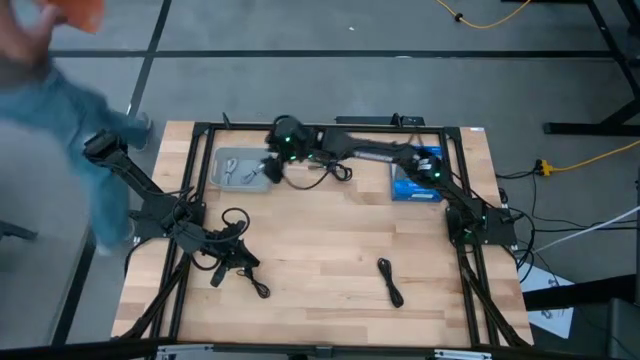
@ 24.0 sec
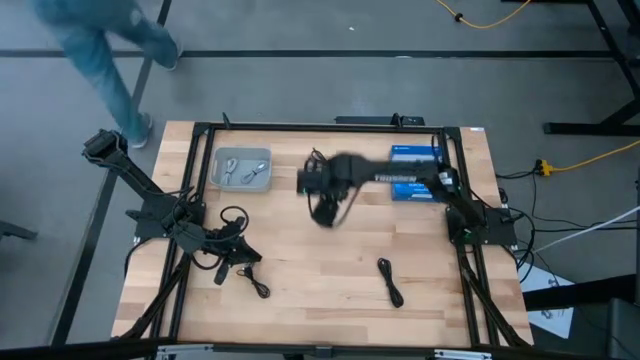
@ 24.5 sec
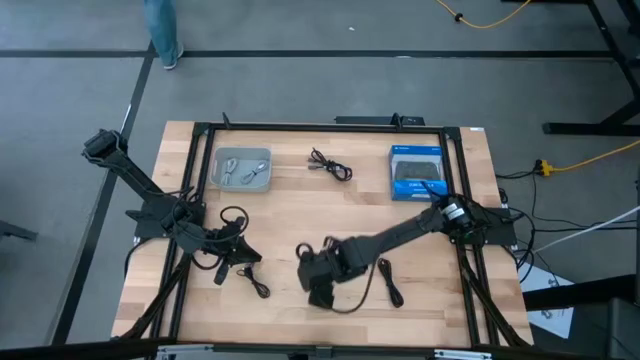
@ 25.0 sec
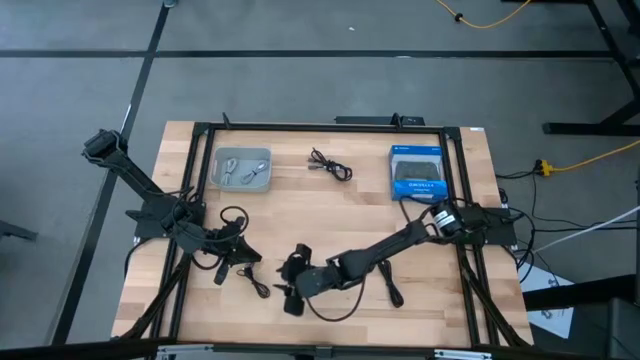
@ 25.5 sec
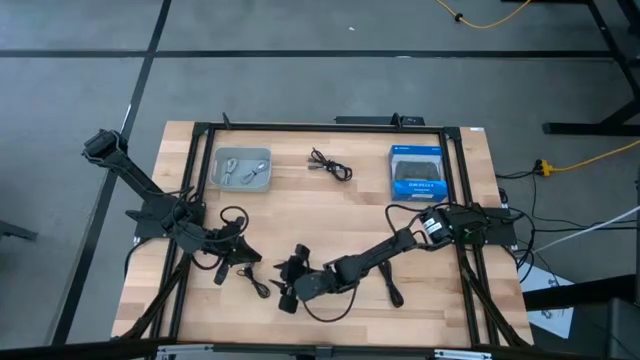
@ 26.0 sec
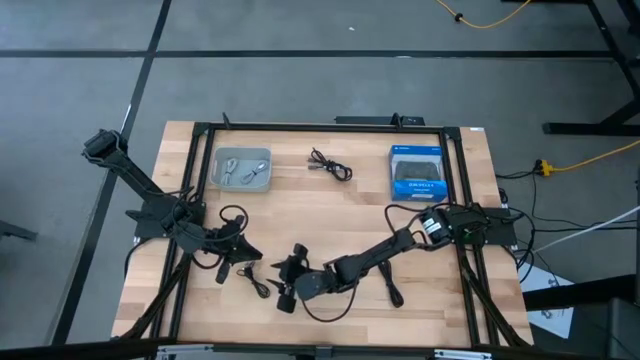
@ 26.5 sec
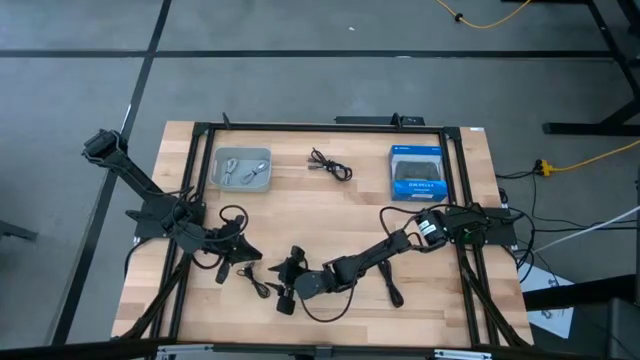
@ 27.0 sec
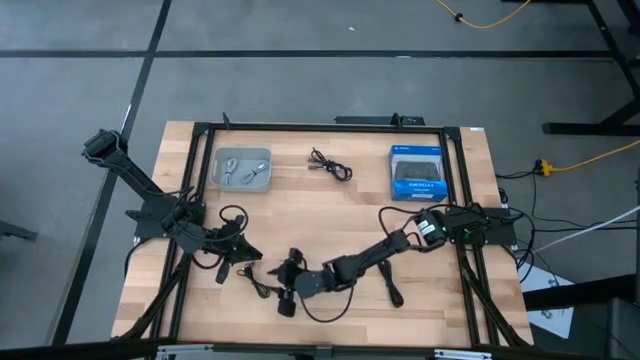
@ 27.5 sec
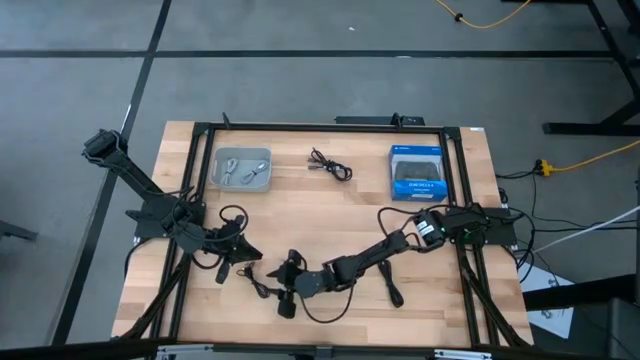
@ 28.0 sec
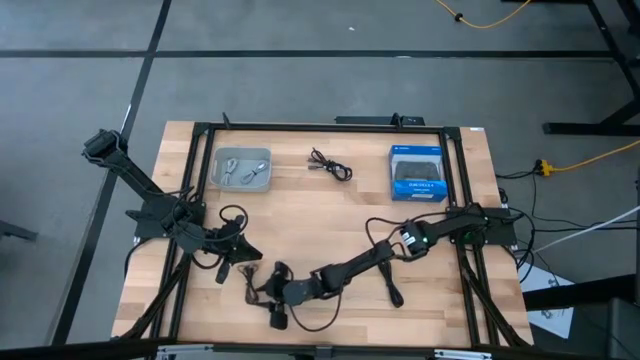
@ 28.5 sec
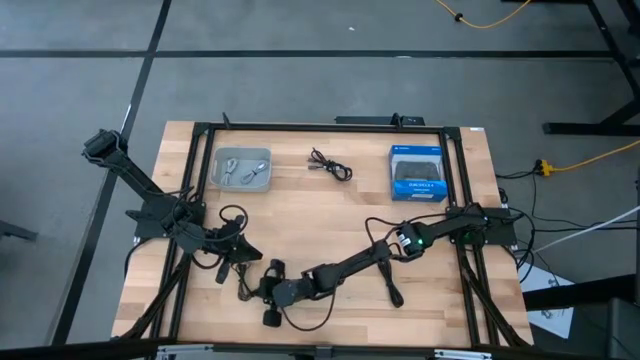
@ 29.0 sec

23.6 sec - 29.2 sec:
Task: Pick and place USB-C Cables
Put the bottom left black charger cable into the gray bin

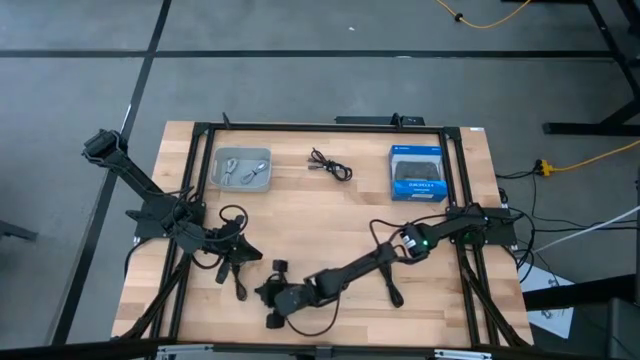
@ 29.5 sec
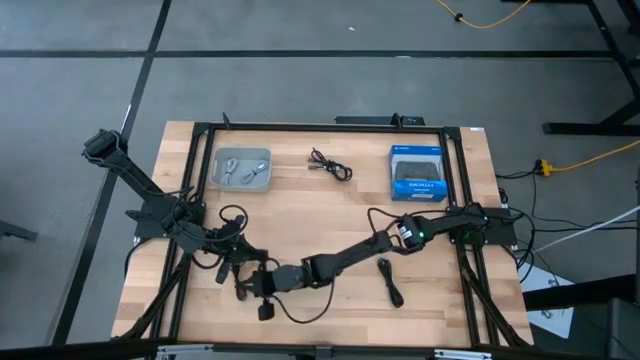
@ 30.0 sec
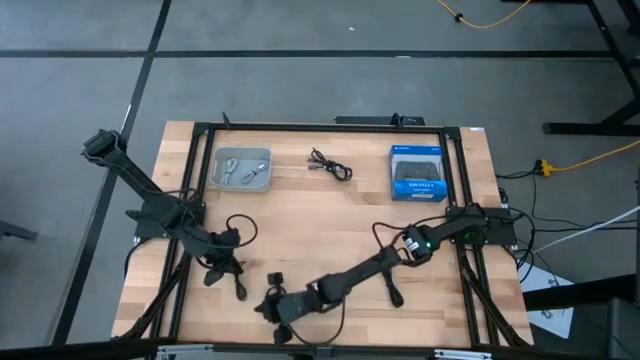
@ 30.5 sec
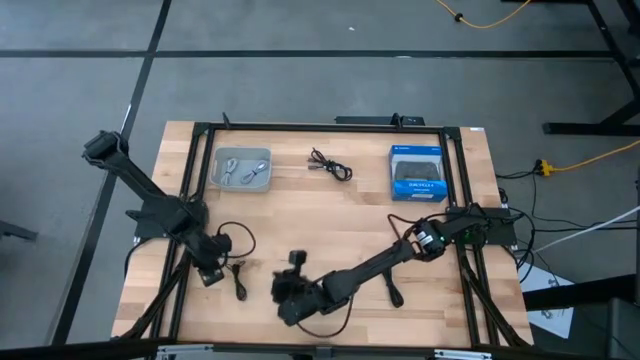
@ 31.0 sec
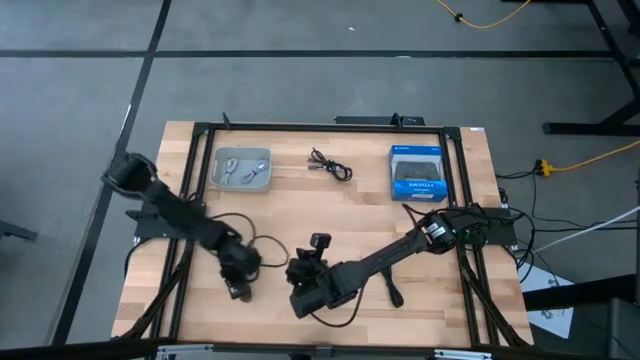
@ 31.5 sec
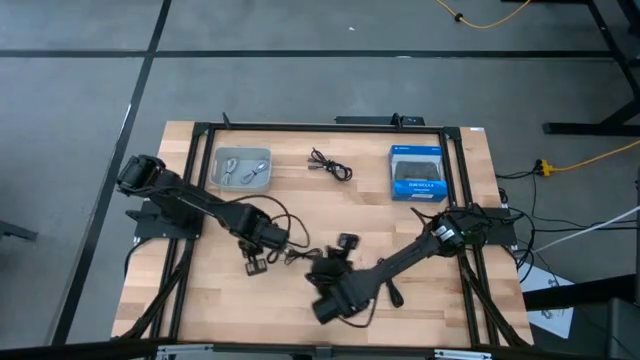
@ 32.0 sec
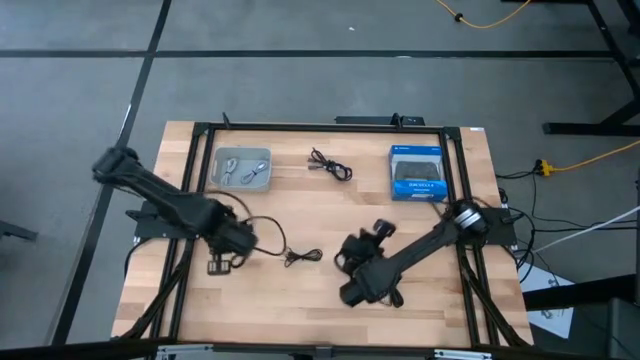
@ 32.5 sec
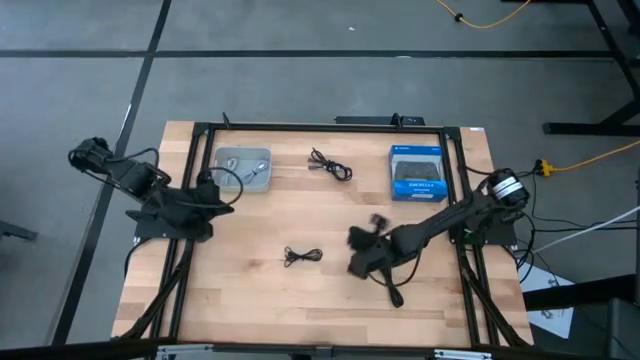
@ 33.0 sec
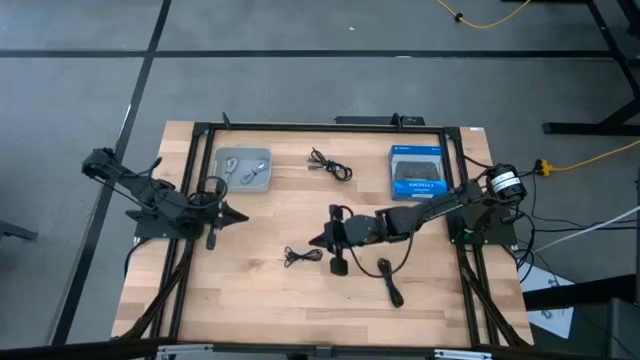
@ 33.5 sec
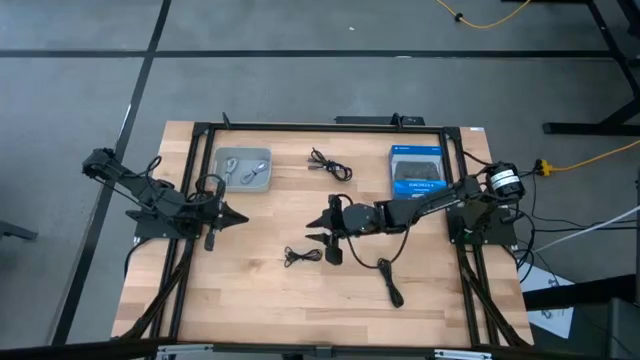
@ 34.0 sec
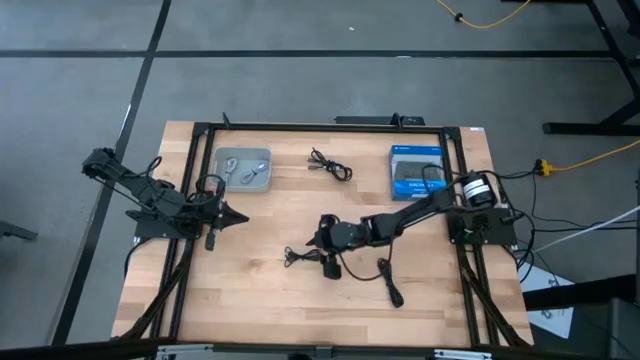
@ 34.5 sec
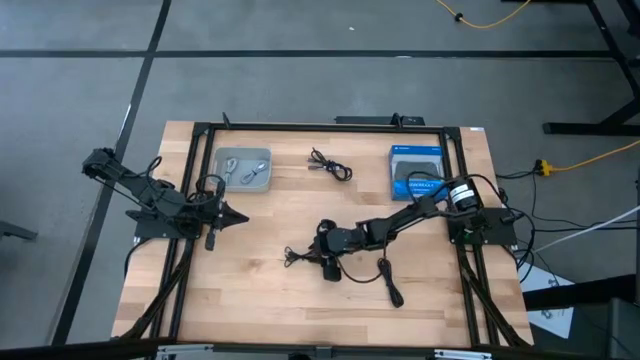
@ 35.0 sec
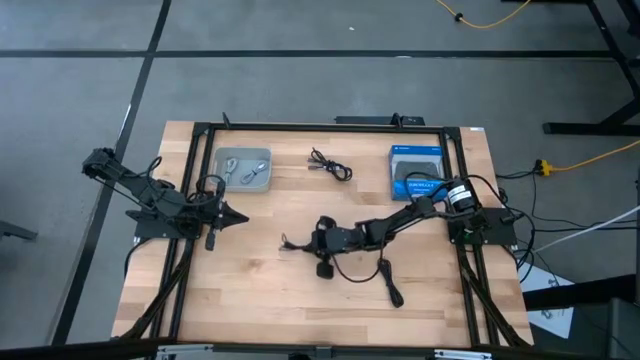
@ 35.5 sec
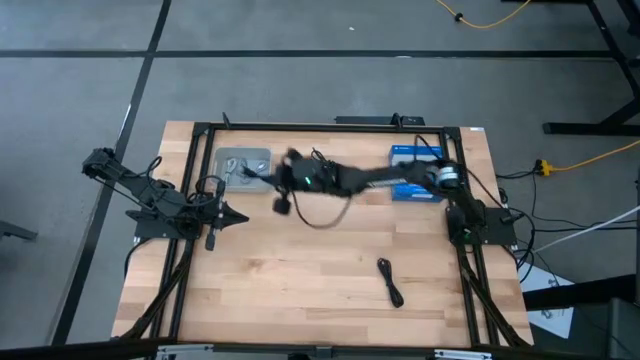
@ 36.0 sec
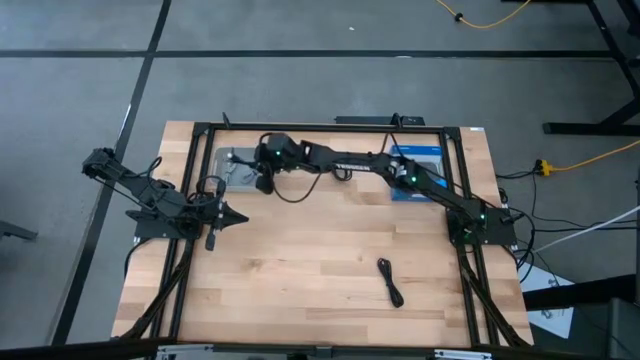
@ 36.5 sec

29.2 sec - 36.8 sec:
Put the bottom left black charger cable into the gray bin

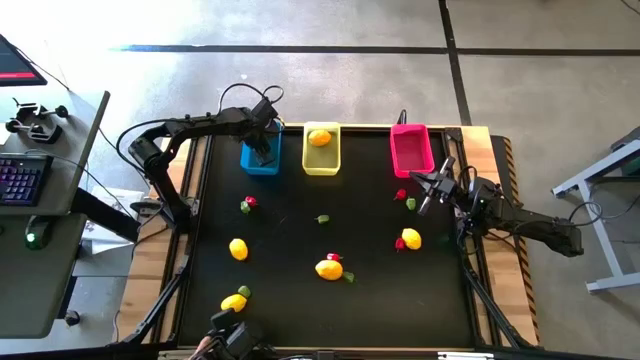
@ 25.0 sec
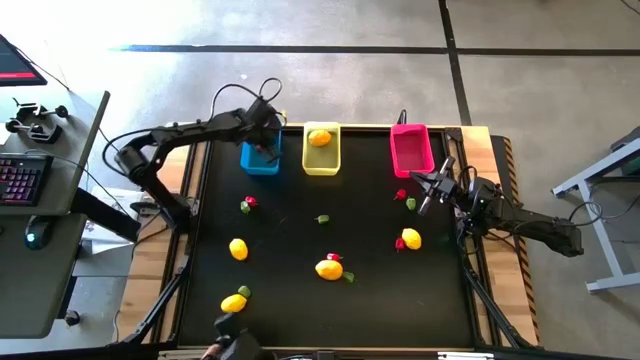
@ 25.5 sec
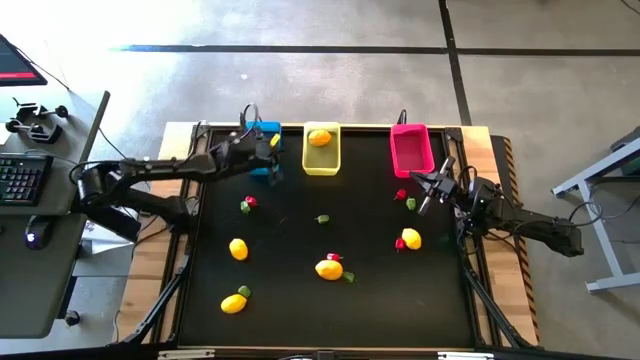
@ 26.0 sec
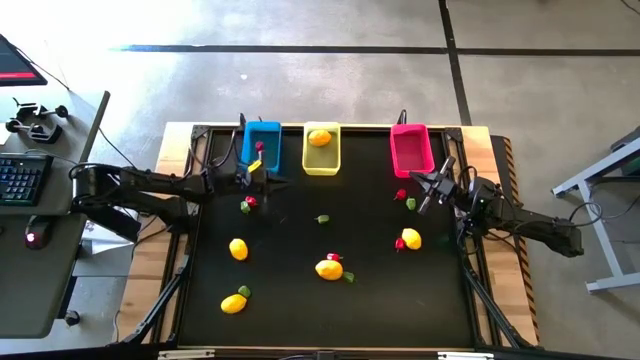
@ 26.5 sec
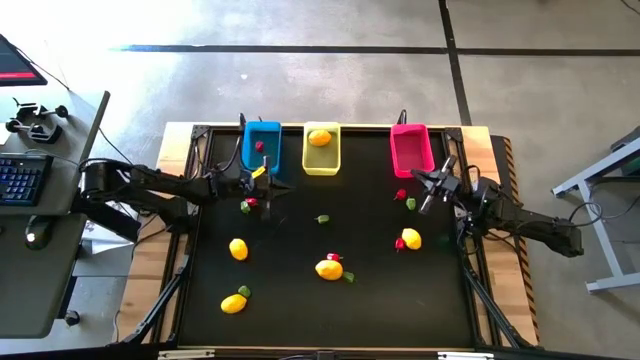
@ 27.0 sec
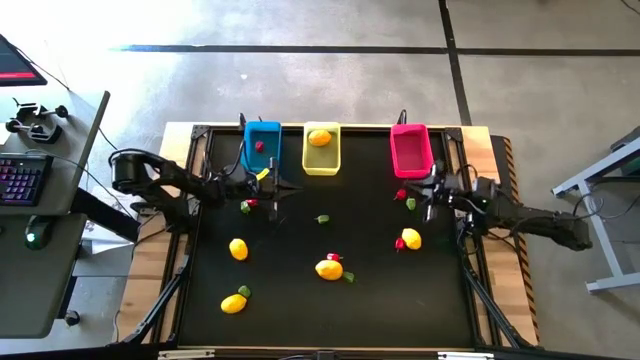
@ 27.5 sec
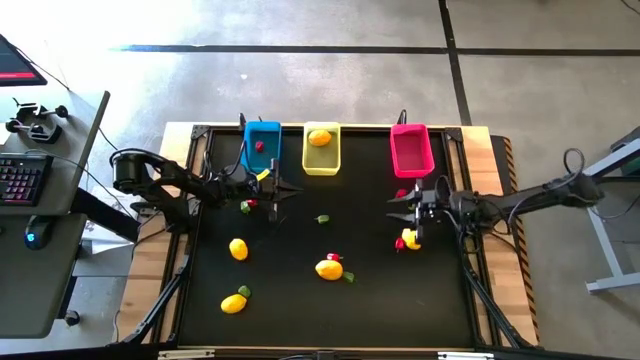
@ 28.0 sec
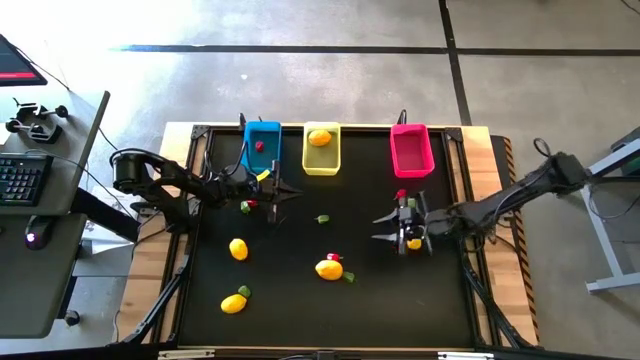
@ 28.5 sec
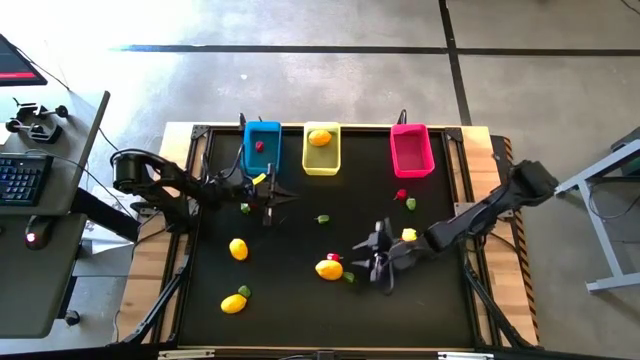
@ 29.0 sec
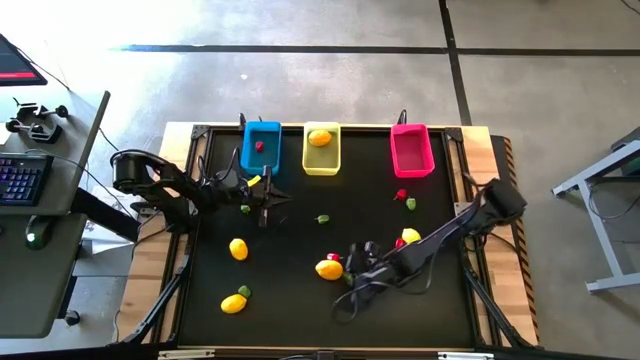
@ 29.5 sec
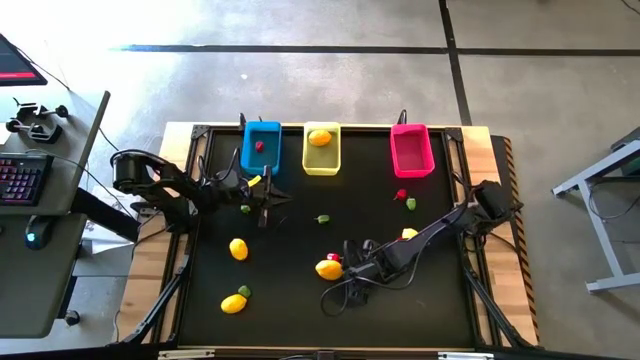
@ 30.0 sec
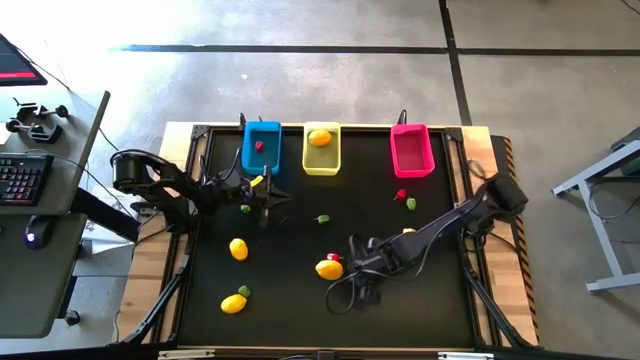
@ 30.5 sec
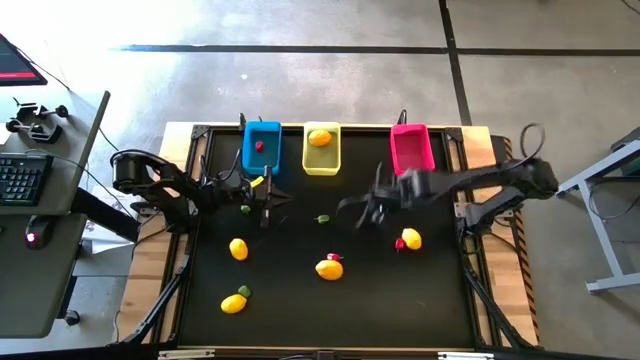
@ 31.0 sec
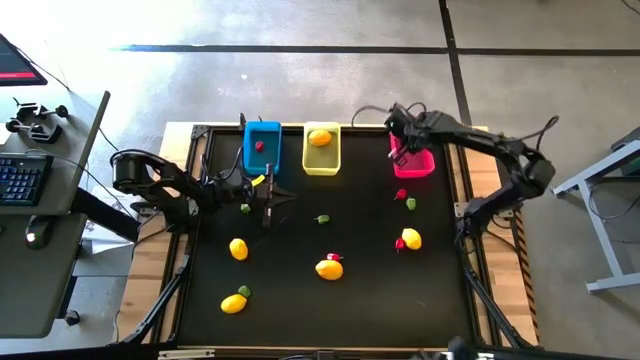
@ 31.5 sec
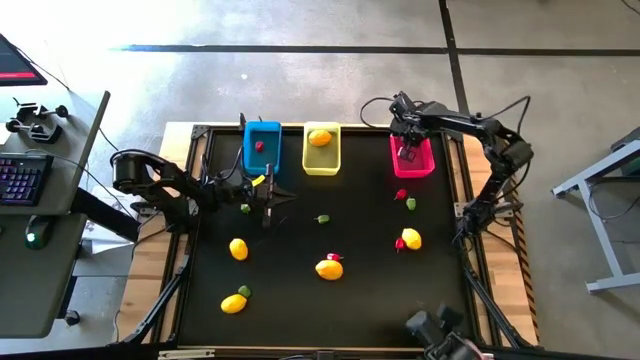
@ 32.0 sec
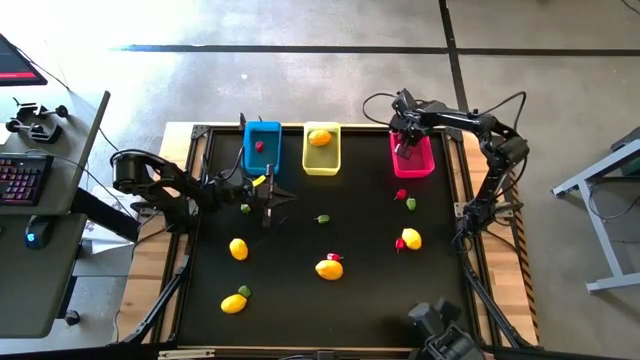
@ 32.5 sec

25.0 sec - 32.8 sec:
Task: Sort produce into baskets
Put the green bell pepper into the pink bin
